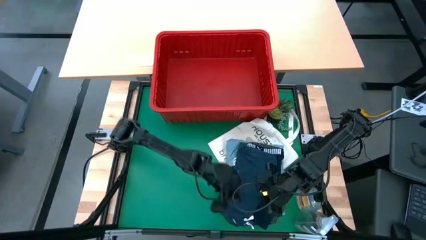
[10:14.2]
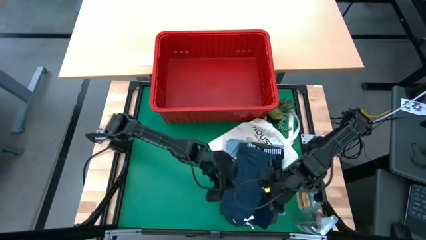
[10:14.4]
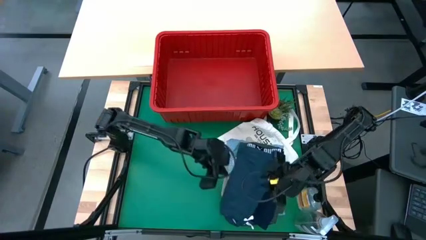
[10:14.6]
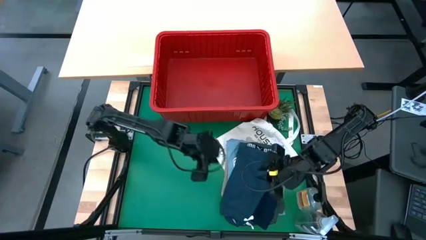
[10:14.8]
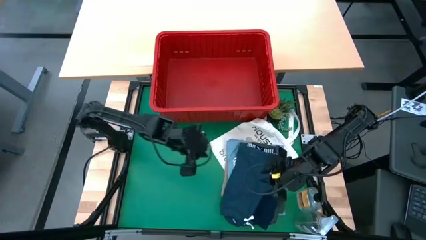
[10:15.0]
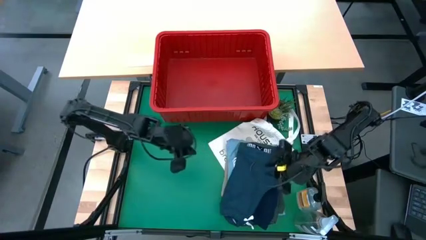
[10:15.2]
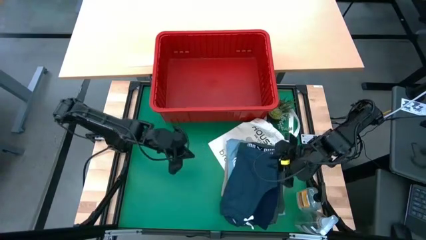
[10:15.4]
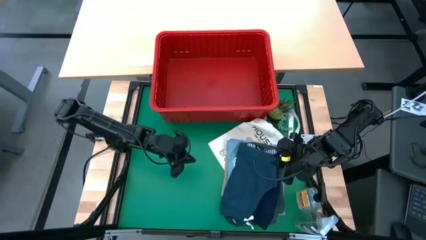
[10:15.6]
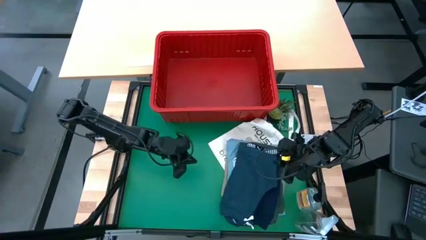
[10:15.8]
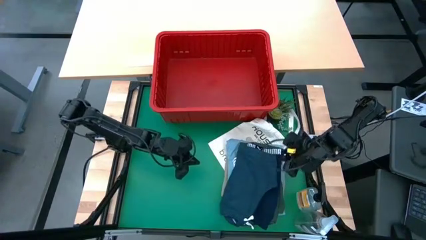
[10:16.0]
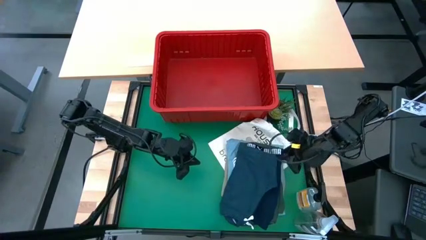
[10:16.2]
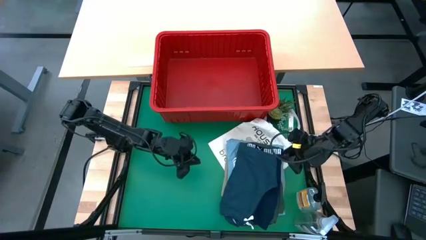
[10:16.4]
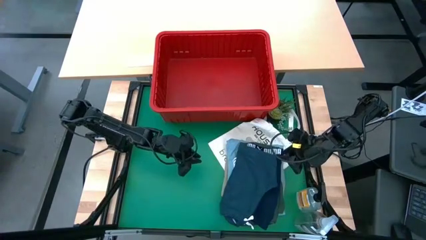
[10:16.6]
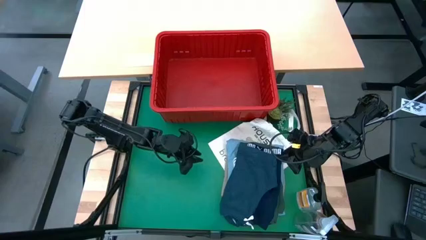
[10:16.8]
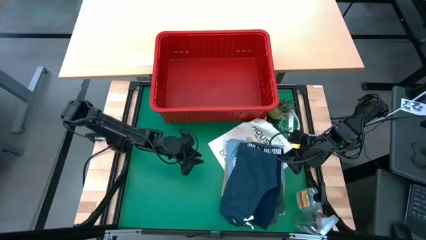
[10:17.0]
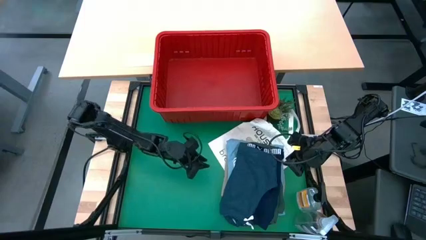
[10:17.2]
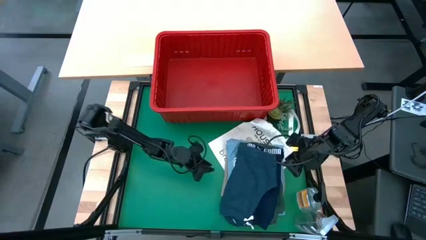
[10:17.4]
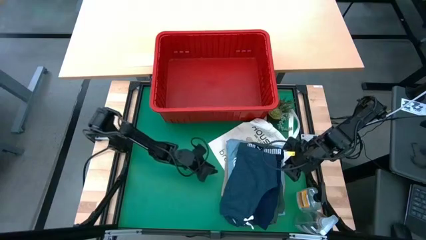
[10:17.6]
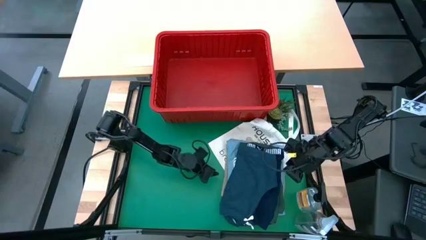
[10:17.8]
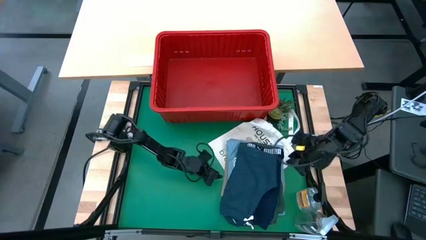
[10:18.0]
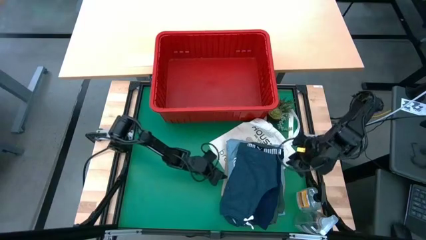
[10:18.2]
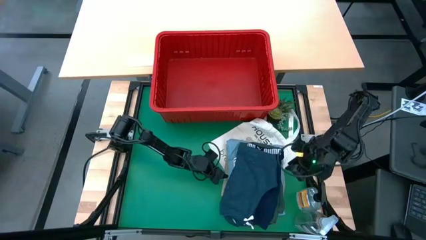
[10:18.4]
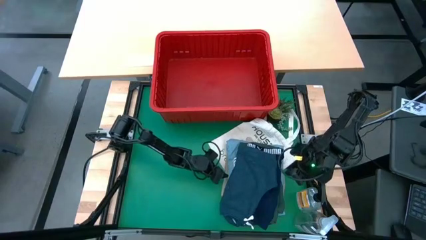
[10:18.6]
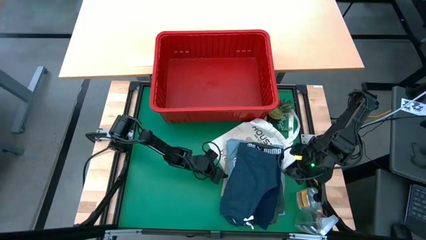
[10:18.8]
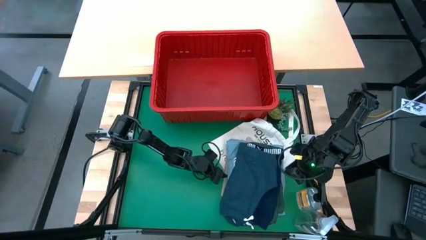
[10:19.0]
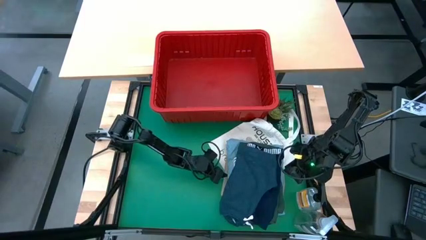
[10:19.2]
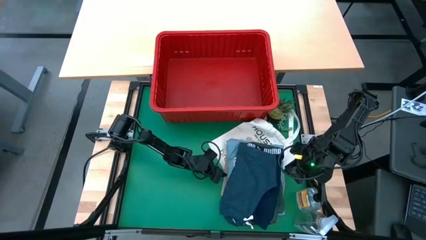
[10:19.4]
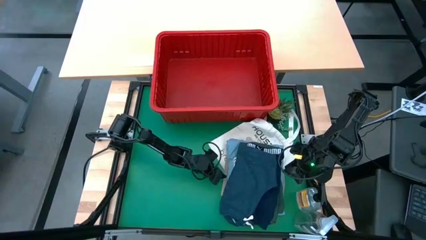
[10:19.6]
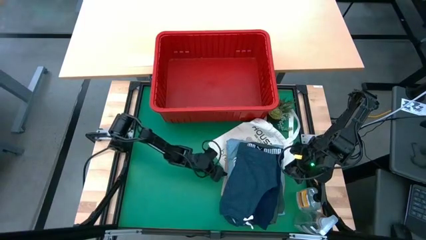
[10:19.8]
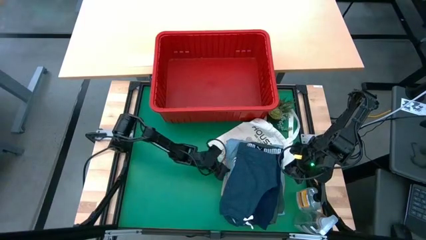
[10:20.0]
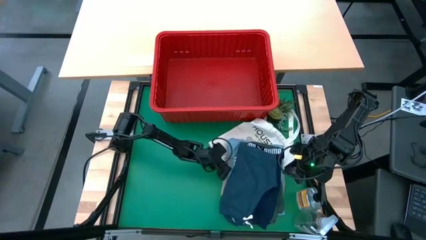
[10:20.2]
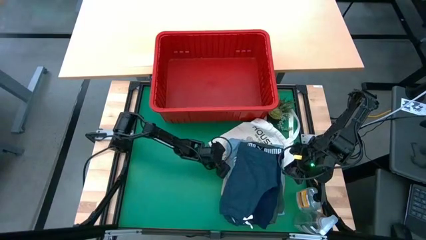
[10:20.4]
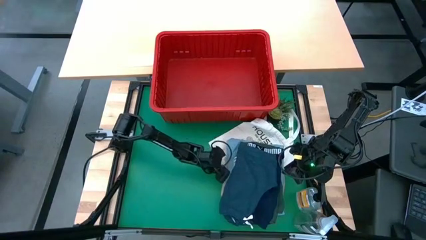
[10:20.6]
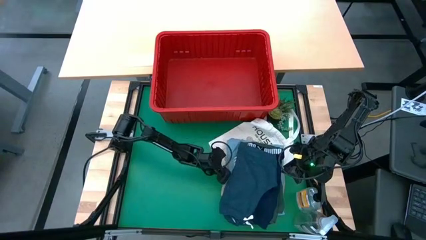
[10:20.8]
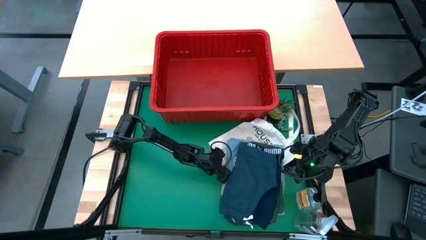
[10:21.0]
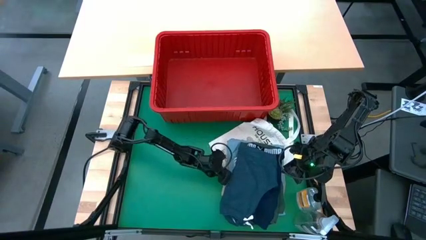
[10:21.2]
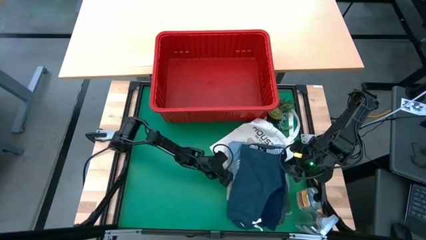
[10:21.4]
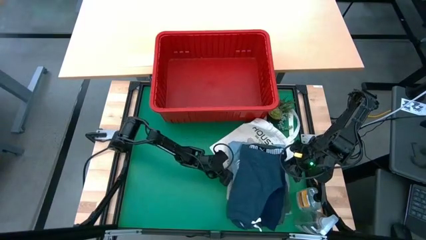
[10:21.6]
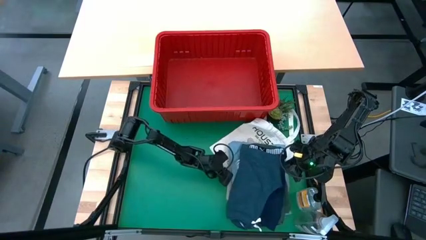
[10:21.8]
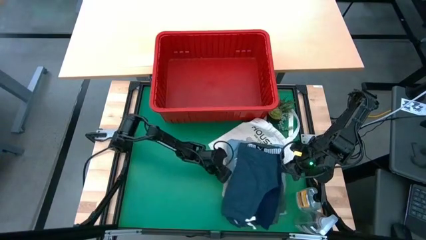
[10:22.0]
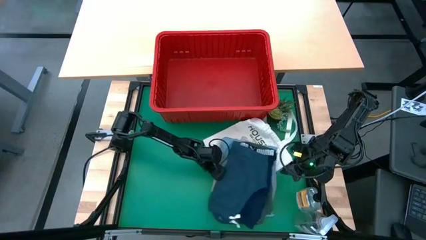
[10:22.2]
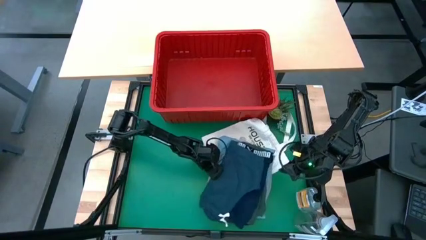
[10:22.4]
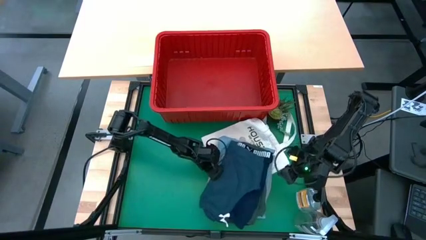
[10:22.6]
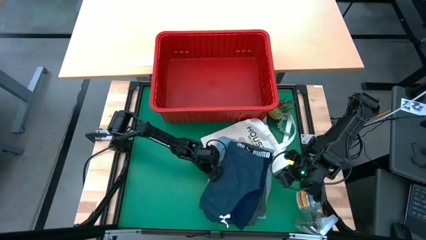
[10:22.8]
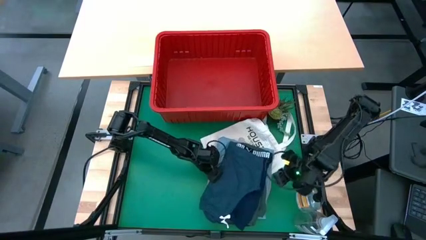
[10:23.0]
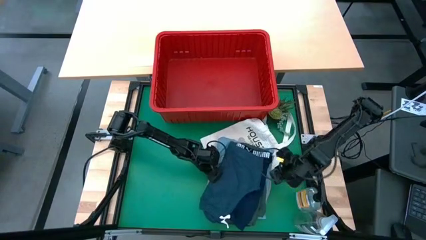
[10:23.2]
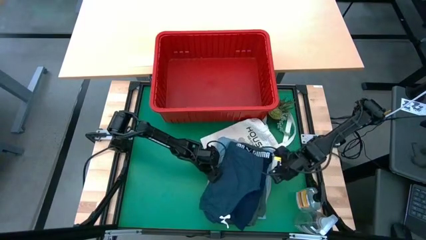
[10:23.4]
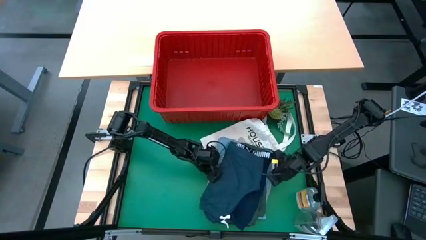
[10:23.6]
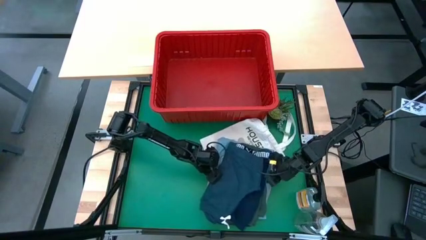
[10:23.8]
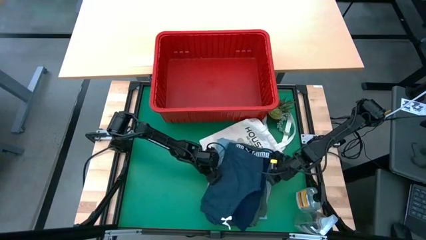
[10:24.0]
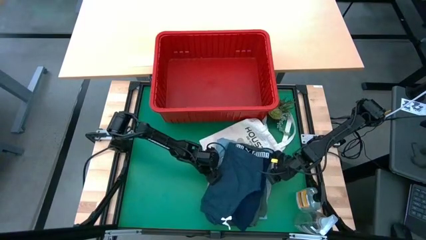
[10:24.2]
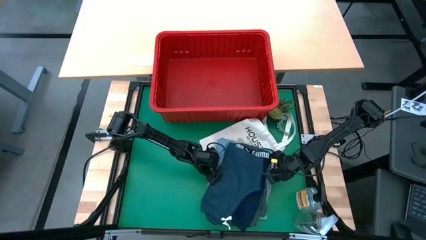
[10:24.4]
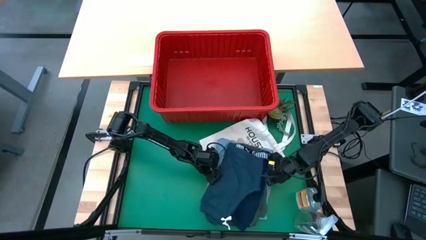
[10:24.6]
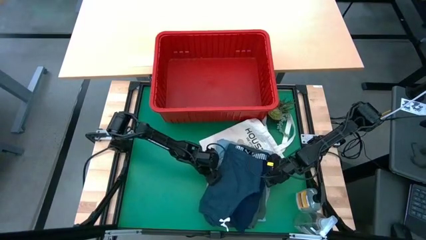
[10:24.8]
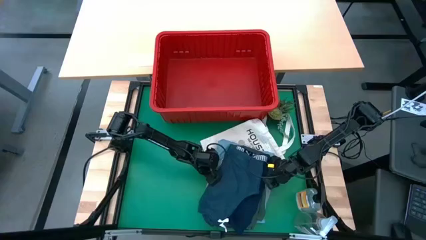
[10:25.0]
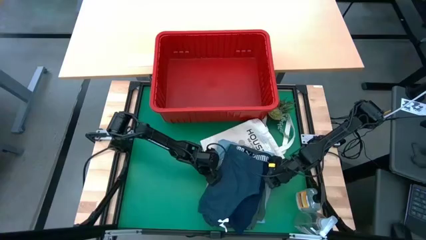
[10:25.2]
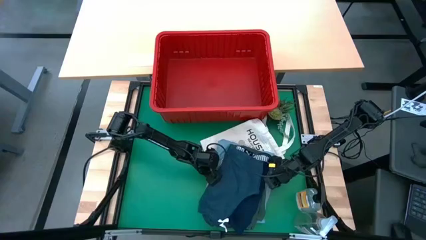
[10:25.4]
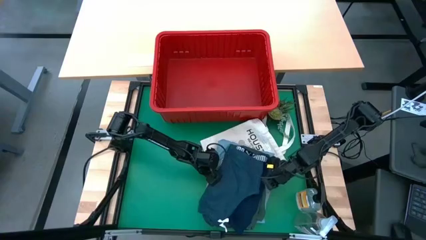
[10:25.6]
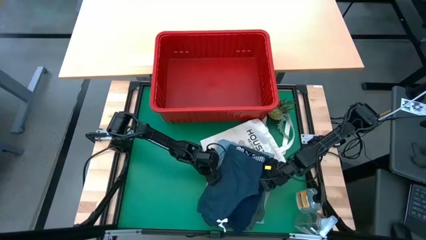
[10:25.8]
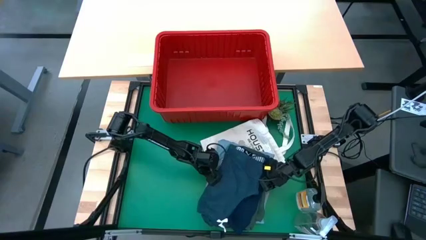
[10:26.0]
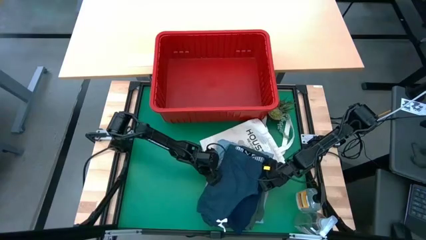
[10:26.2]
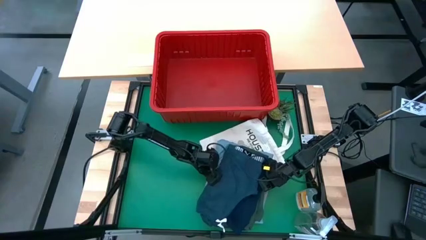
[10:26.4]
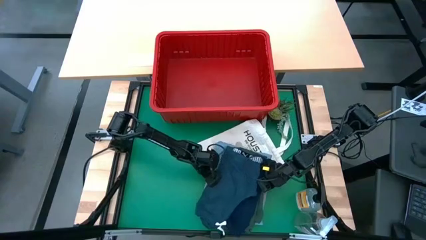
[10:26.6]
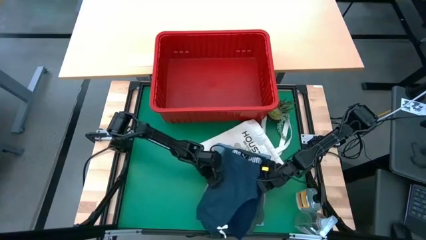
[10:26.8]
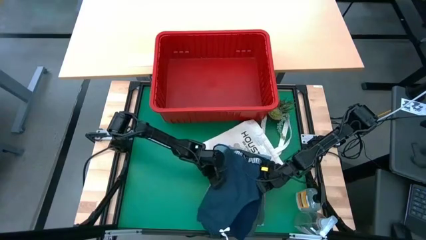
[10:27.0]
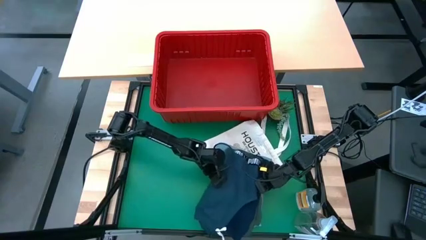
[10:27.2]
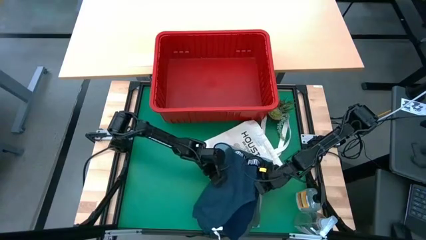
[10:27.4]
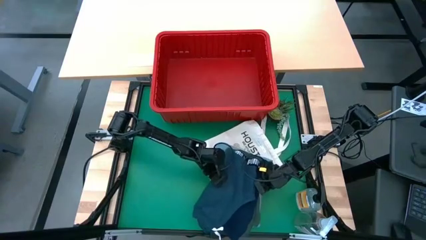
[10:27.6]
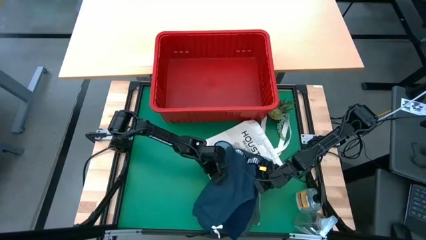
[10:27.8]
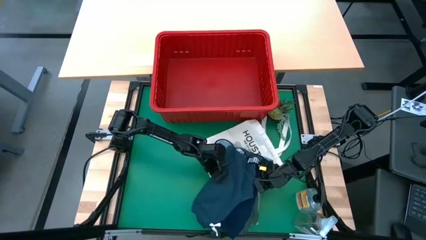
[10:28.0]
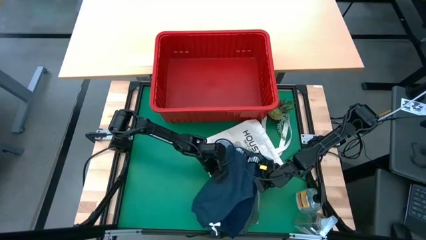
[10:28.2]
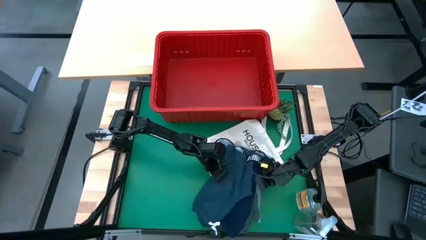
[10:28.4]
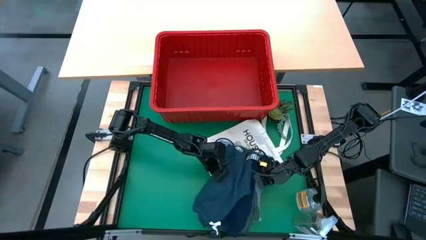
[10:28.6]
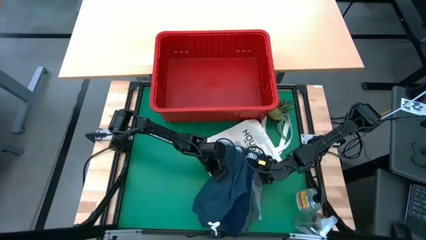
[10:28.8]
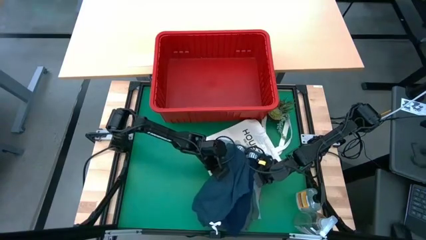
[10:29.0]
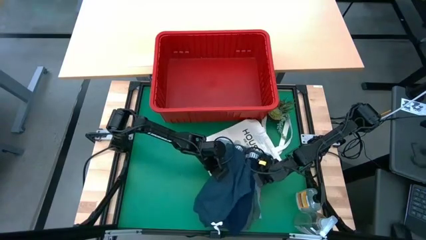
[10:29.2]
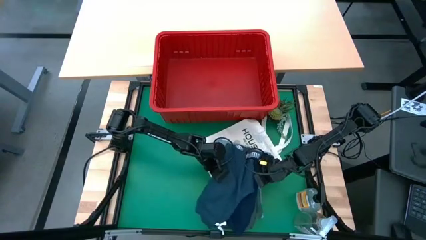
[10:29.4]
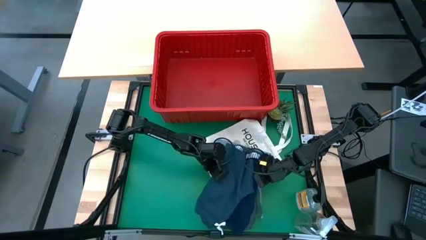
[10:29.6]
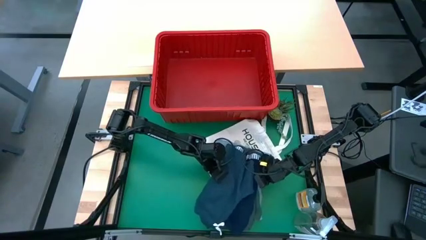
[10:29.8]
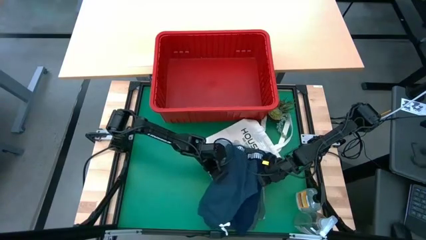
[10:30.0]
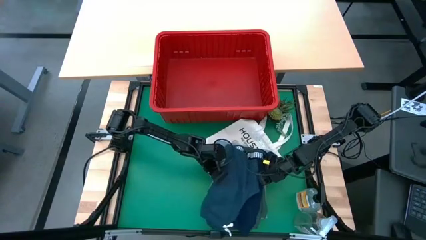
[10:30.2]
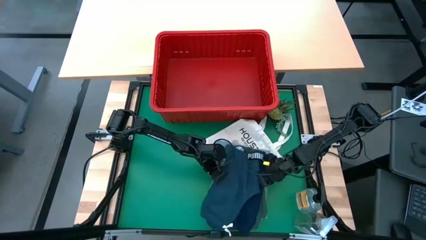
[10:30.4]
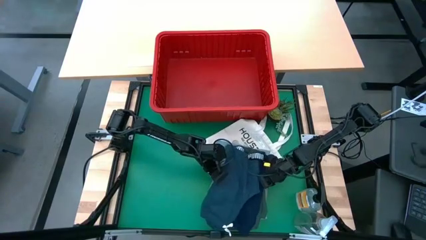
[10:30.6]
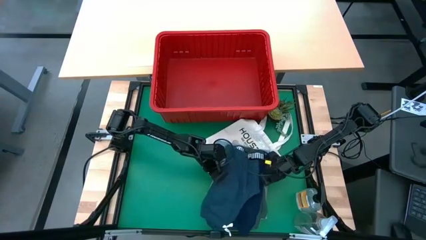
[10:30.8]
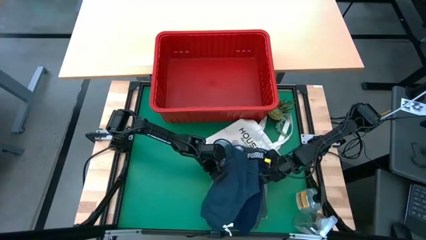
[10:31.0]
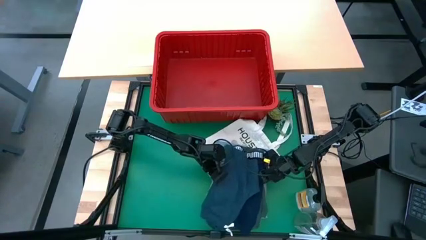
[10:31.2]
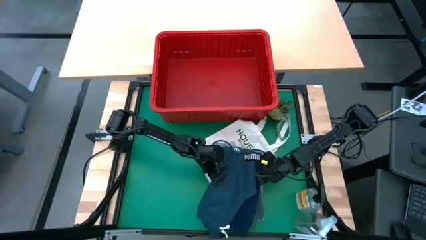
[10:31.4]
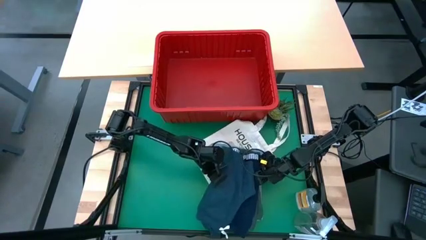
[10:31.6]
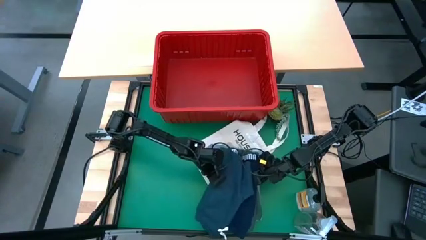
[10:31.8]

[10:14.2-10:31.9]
Task: Fold Laundry from Bin
Put the stacked clothes into the red organizer bin
